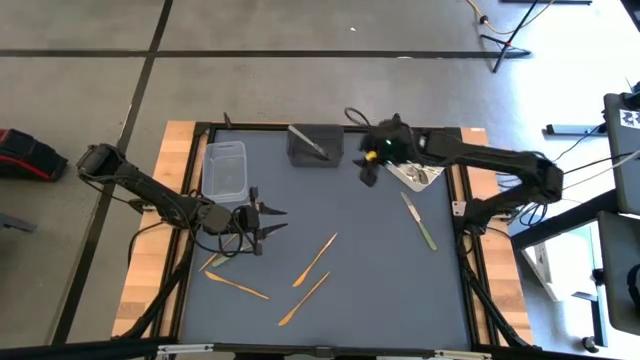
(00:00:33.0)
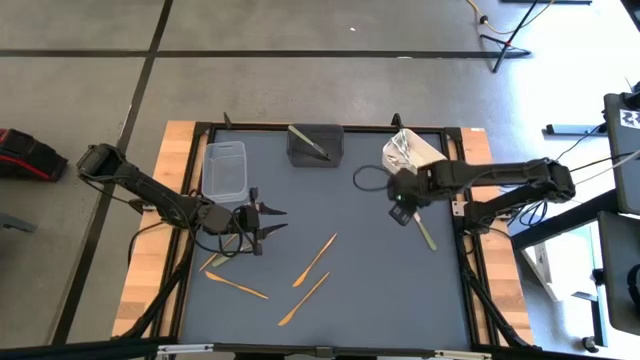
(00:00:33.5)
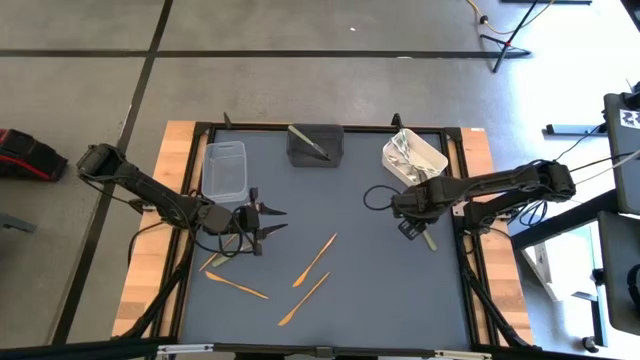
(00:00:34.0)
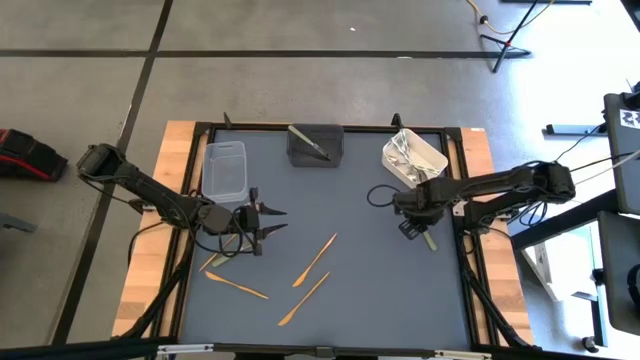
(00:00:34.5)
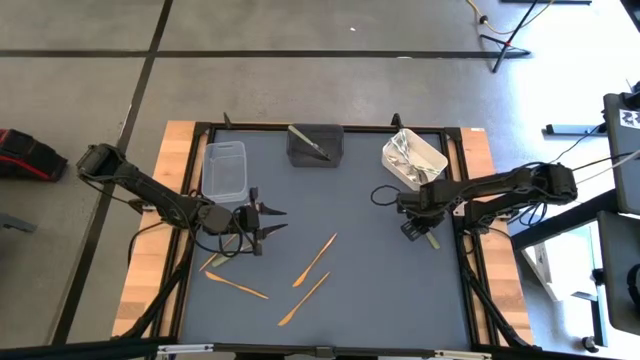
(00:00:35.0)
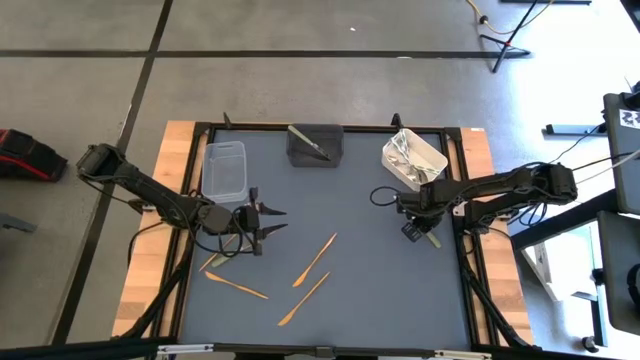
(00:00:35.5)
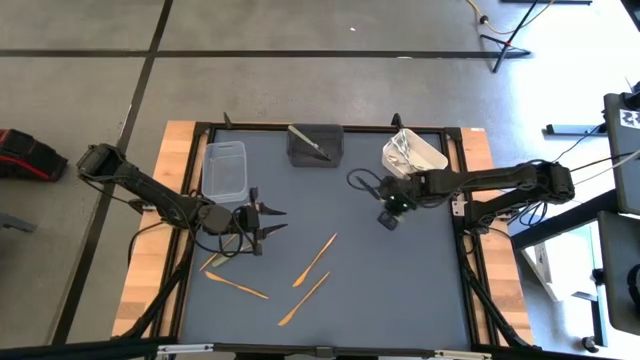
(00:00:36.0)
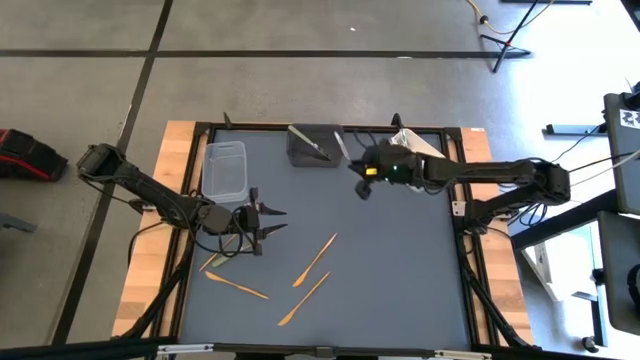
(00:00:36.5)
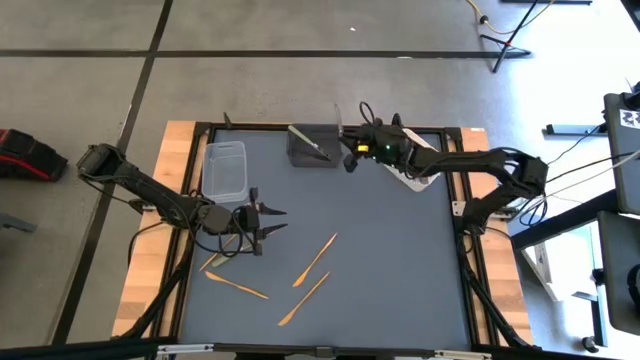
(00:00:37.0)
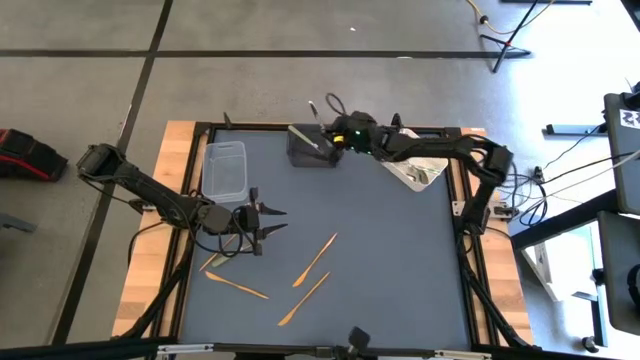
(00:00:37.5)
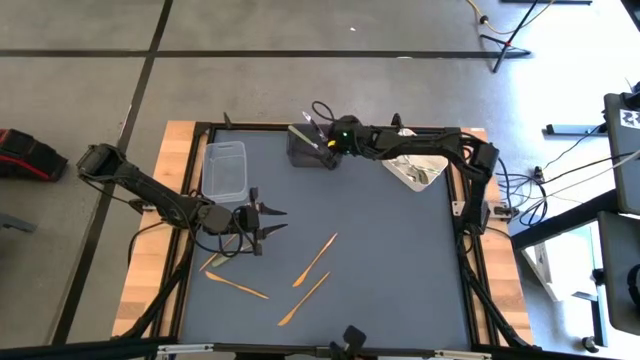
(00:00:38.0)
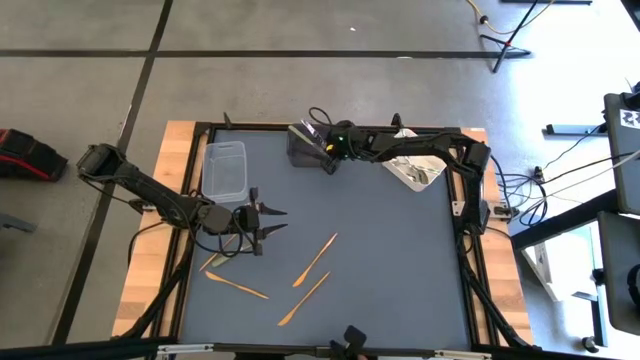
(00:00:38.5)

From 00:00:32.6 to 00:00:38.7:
Task: Sort silverware by color (type)
Put the right green knife into the gray transparent bin

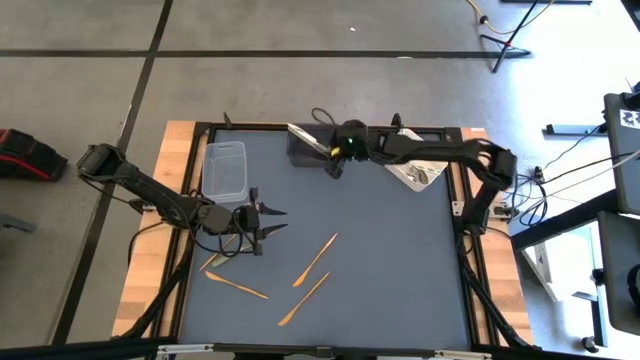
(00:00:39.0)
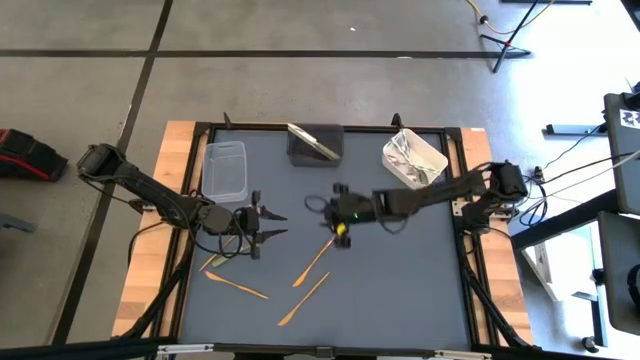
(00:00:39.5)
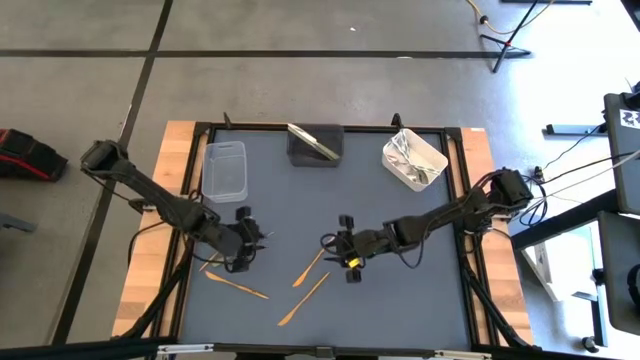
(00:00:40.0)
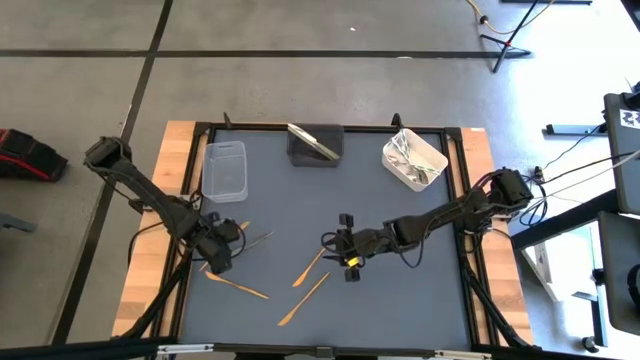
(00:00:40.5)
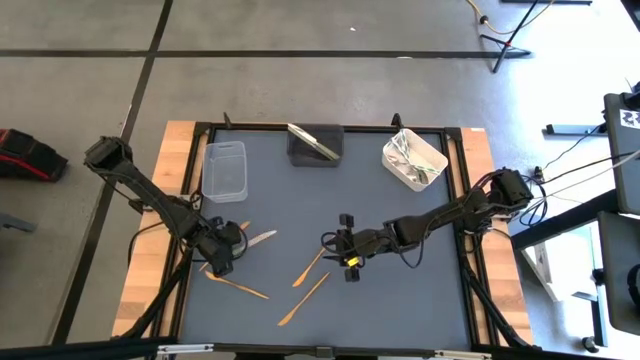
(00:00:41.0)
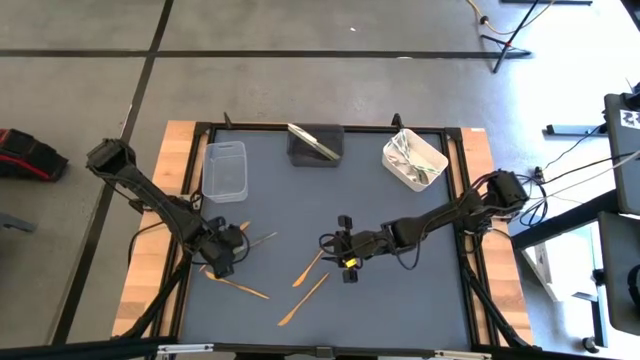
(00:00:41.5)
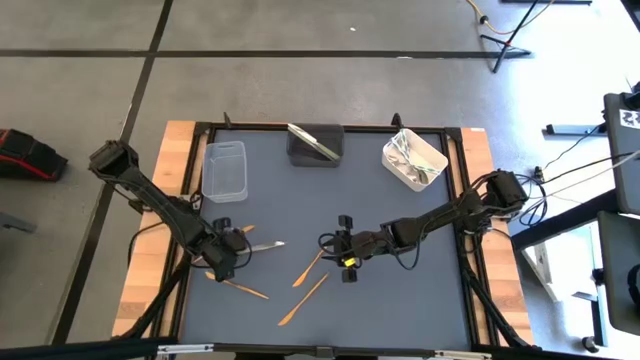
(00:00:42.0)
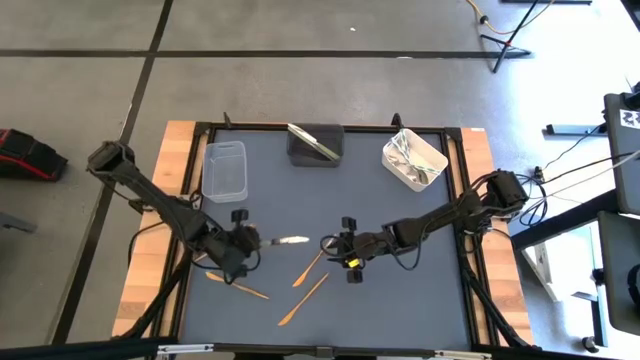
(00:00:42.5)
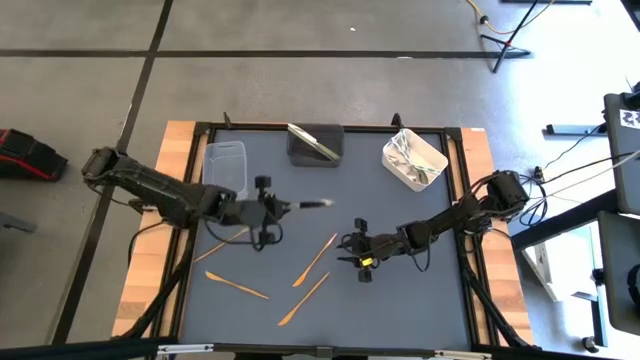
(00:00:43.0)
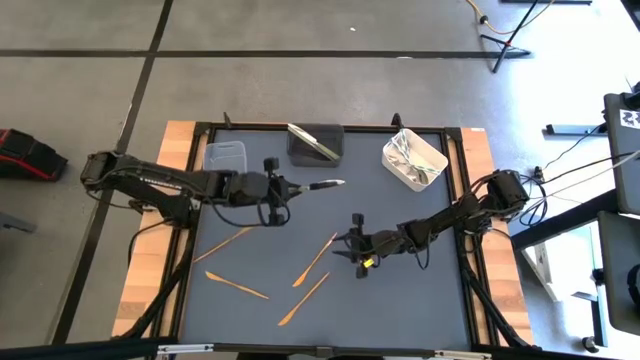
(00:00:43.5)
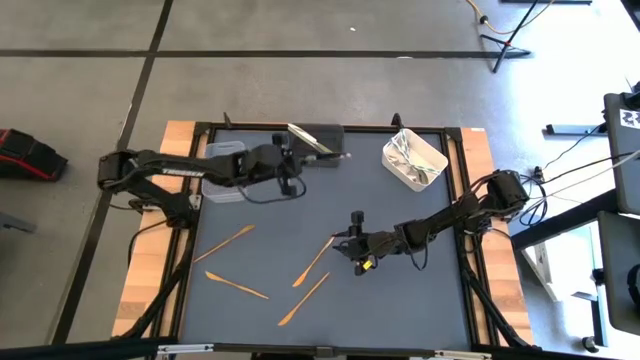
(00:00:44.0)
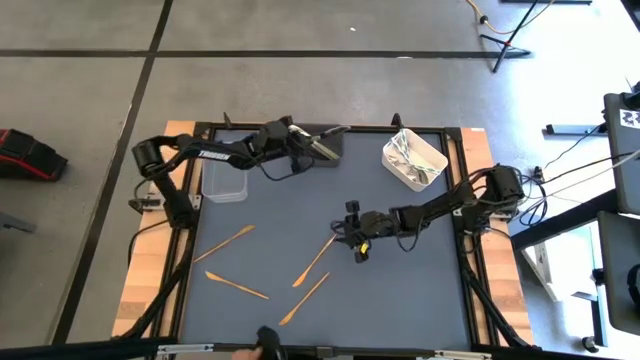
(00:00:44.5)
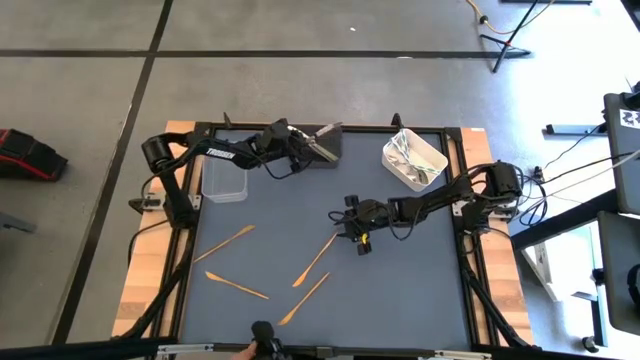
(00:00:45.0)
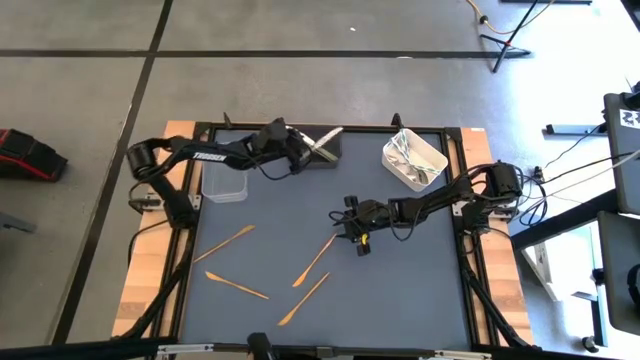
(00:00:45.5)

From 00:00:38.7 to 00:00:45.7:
Put the green knife into the gray transparent bin

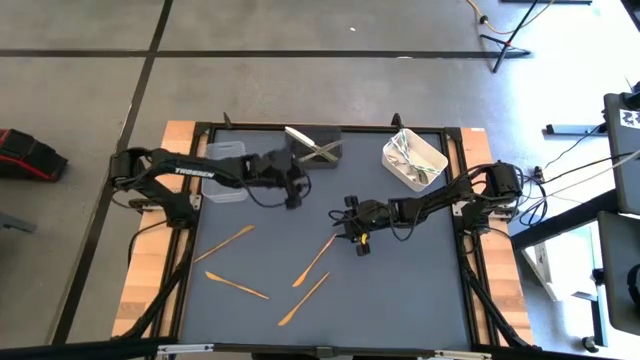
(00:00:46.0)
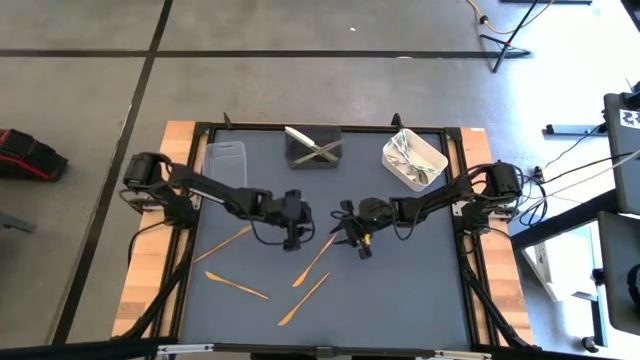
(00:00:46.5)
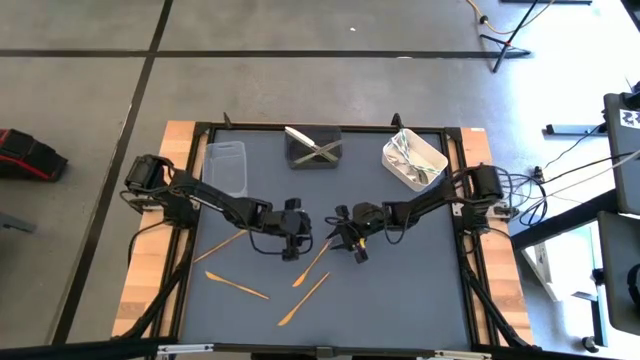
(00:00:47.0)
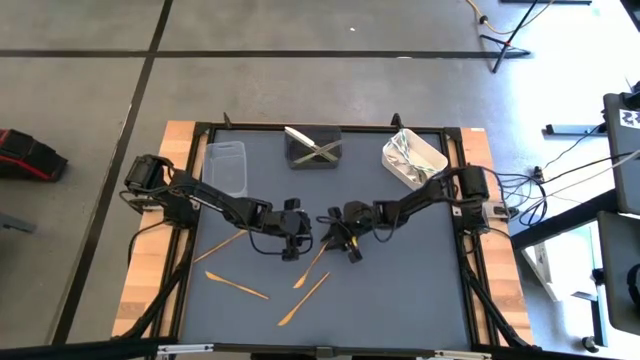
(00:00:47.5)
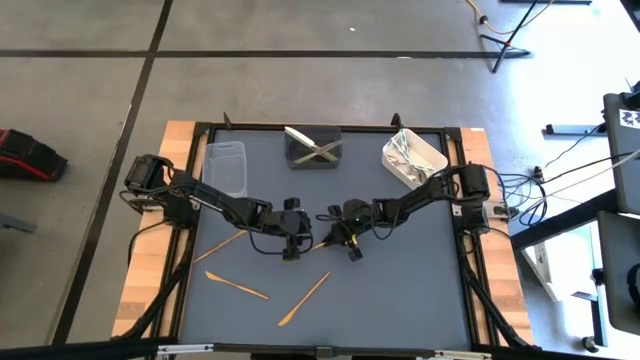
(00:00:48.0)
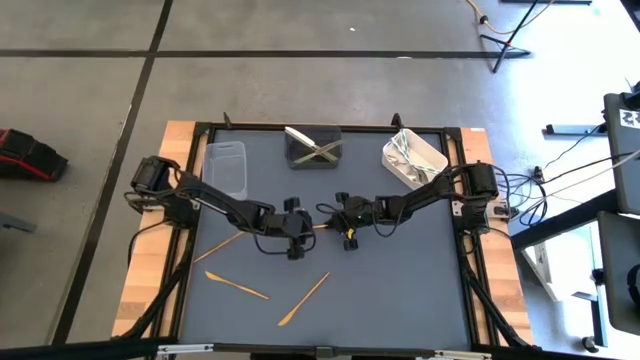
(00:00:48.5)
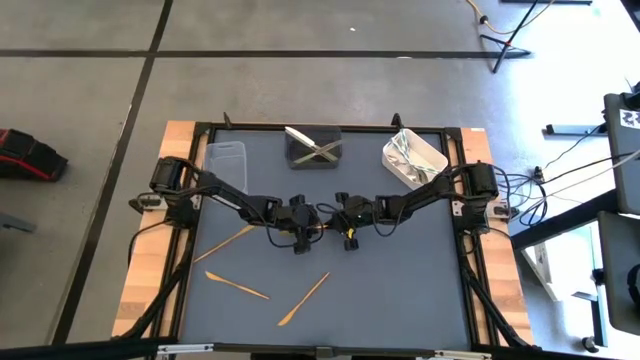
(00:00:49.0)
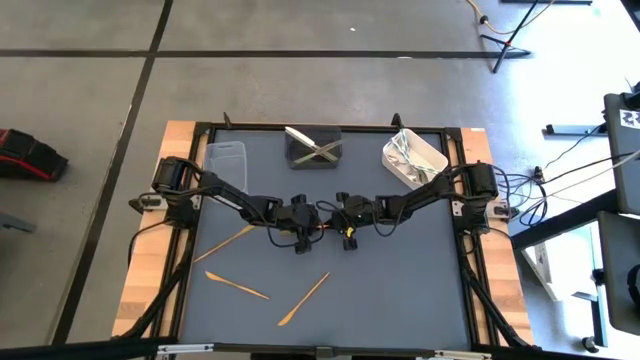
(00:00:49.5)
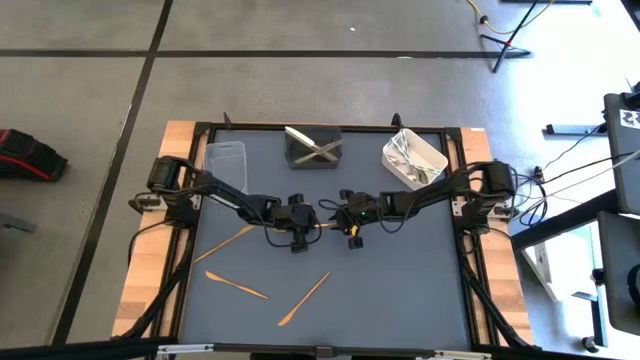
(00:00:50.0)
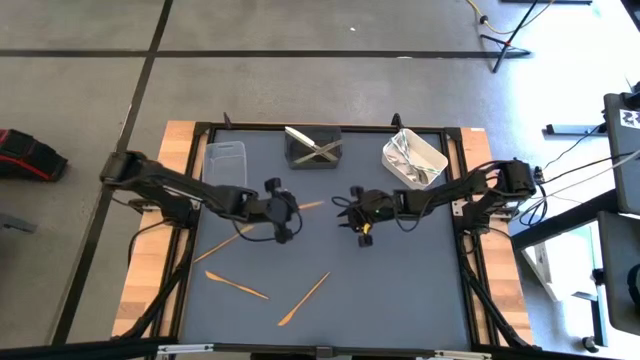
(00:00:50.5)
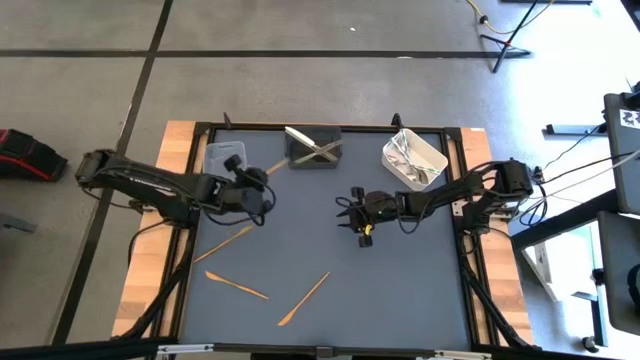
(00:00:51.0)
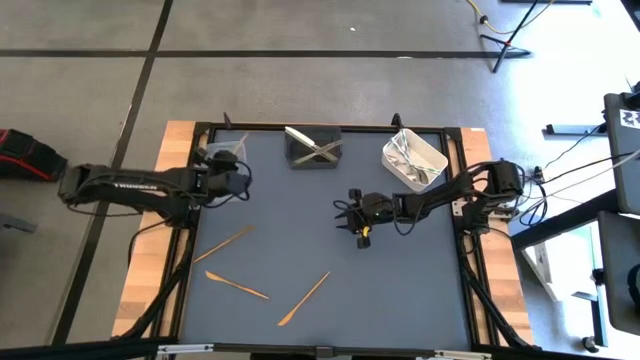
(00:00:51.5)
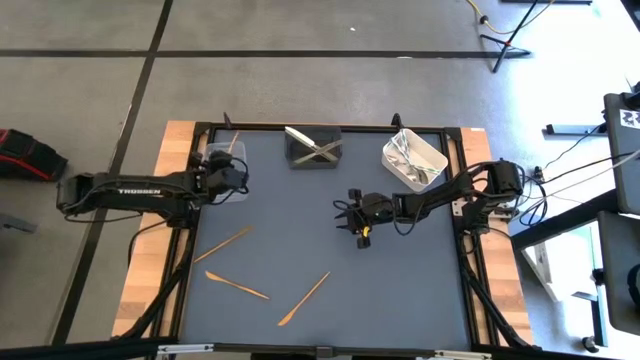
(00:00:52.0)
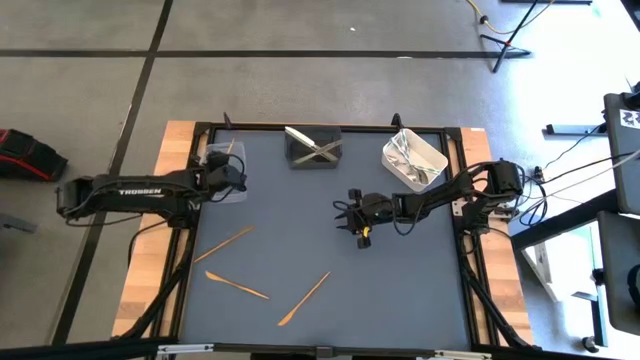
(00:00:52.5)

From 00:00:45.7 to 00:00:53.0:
Put the top right gold knife into the transparent bin

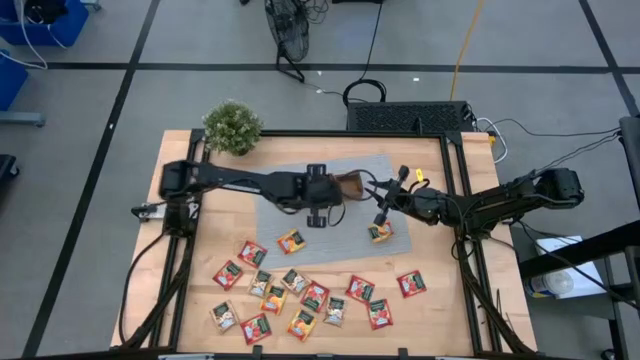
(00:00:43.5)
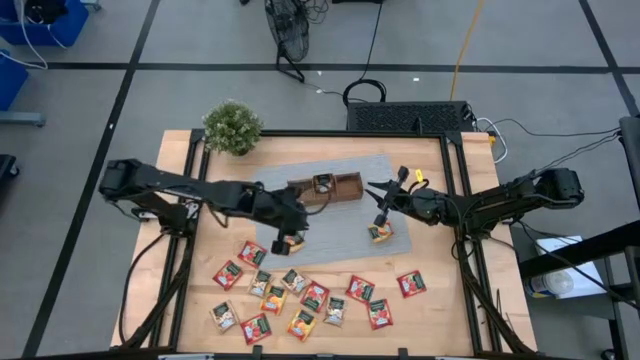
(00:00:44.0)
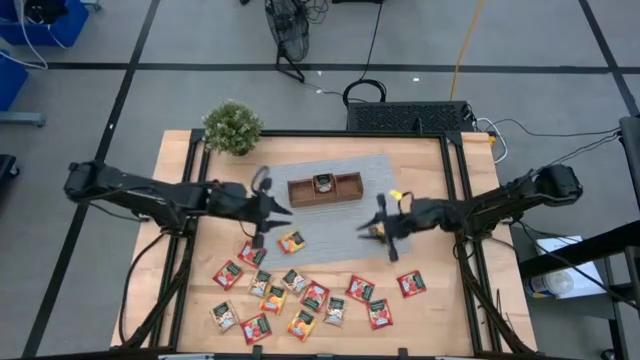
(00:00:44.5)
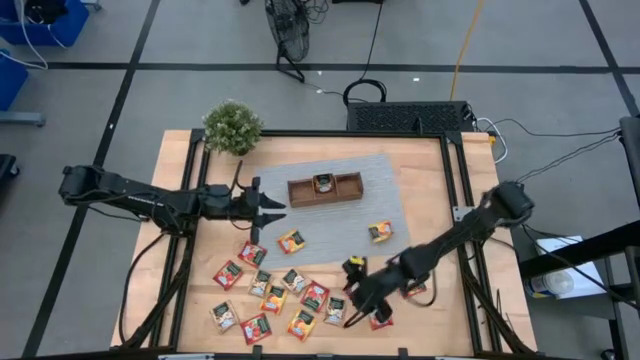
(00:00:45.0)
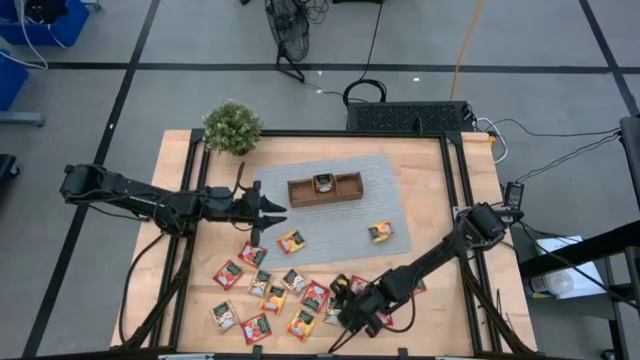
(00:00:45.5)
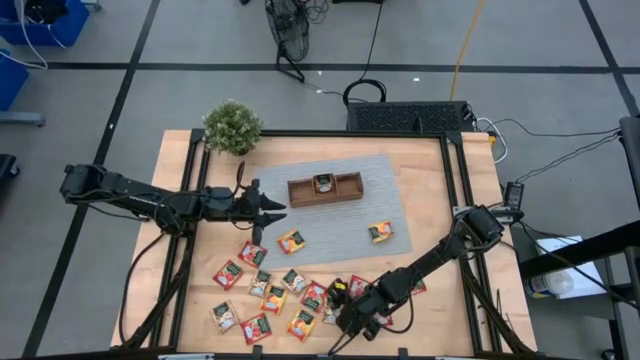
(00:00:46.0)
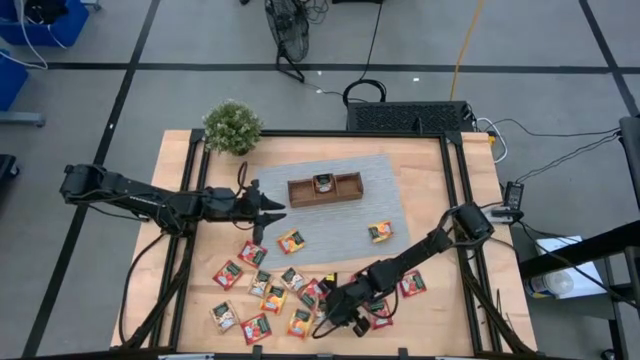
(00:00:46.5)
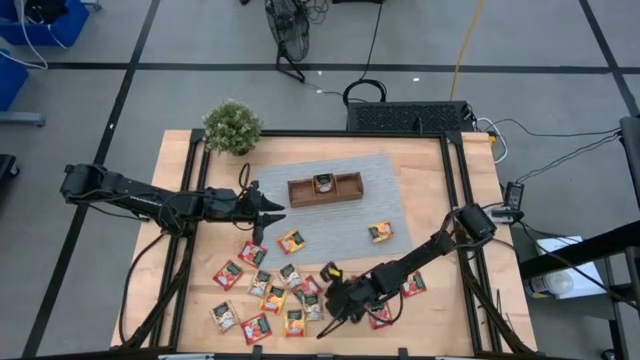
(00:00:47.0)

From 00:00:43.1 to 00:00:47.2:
Task: Pick & Place Tea
Put the brown tea bag into the middle section of the wooden organizer
